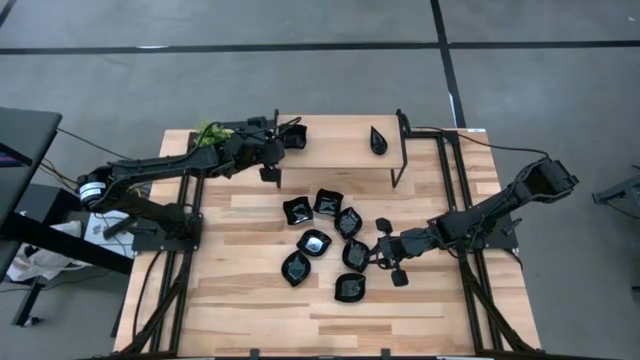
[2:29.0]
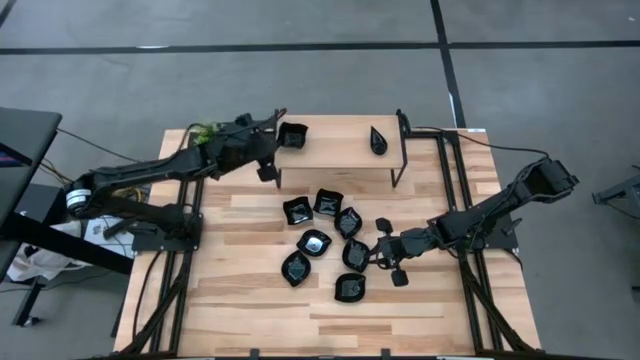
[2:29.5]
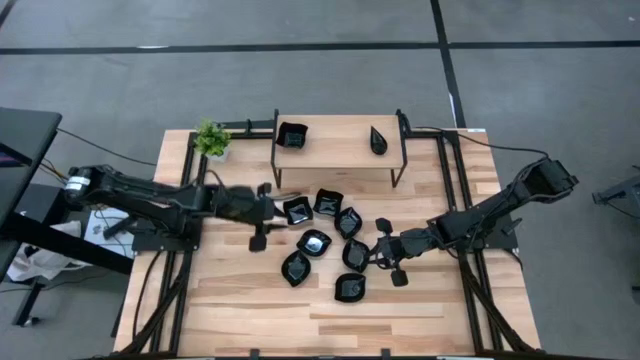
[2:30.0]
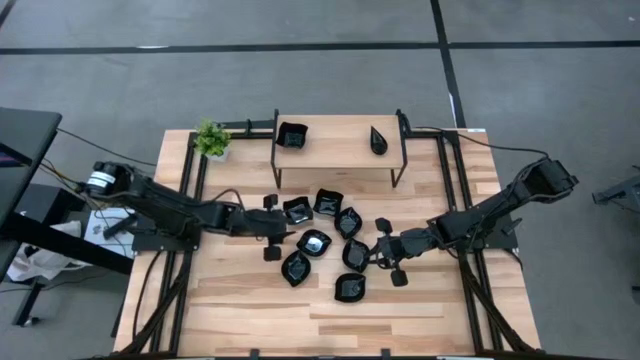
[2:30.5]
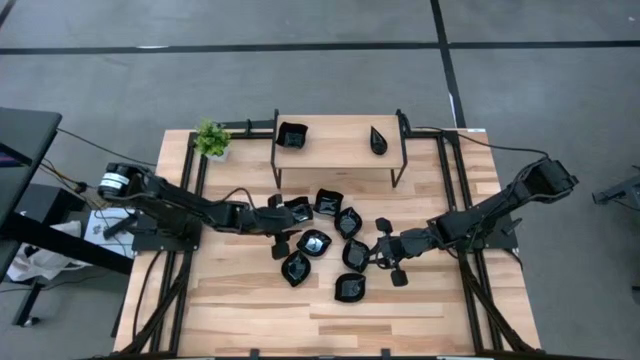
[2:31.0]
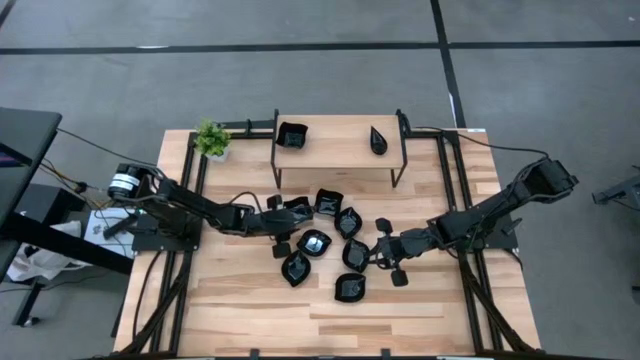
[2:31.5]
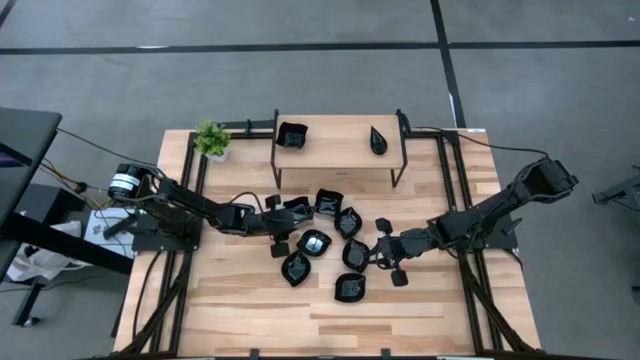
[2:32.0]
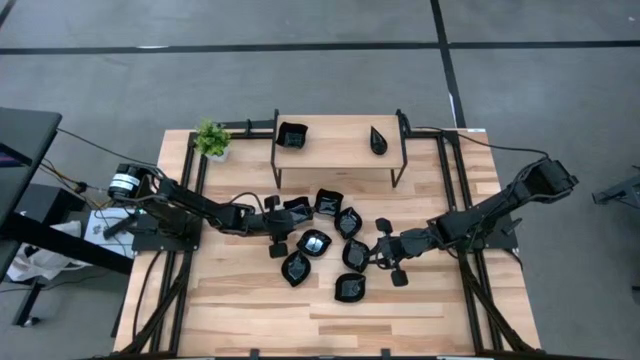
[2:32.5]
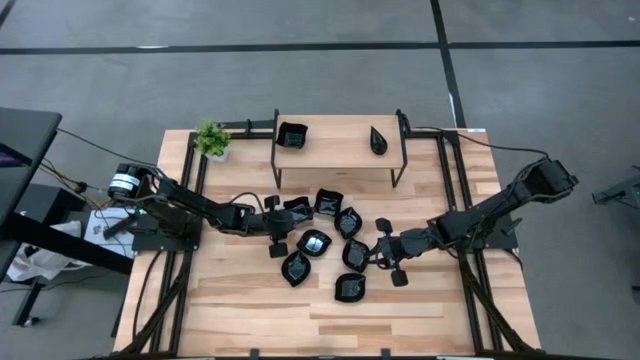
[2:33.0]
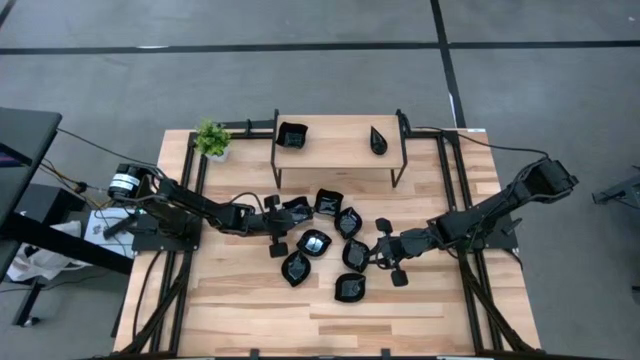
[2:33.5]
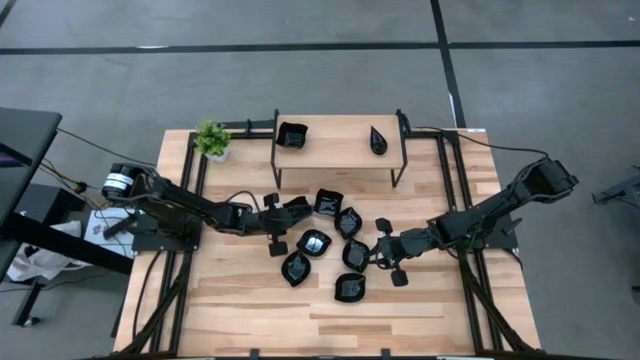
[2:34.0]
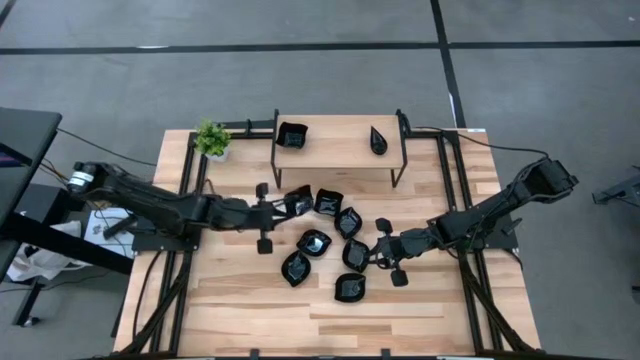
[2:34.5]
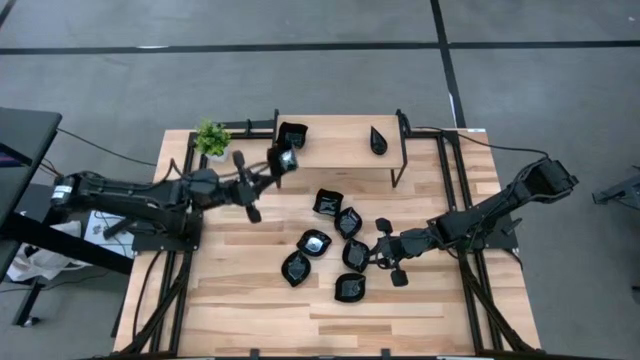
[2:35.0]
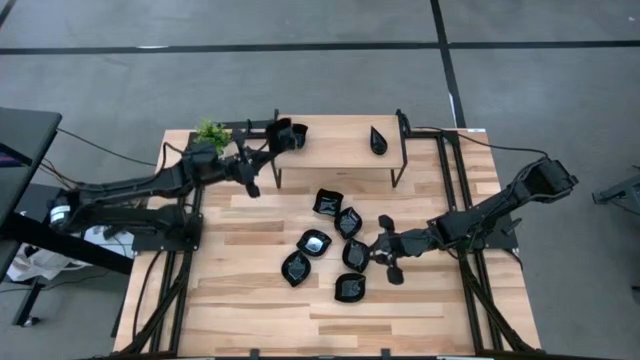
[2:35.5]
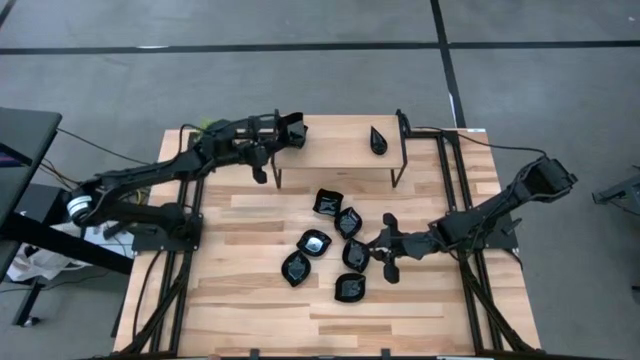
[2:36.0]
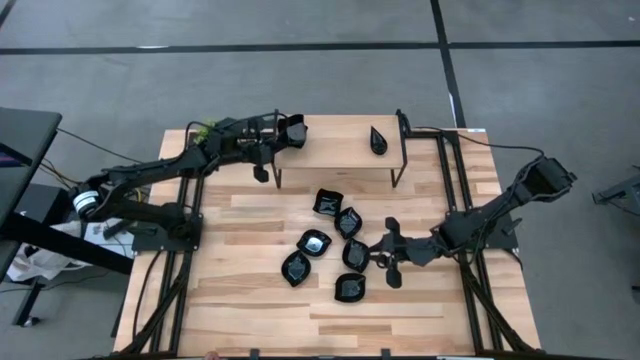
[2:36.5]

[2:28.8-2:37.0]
Task: Pick & Place Mini shaped plates
Stack the black distorted square plate on top of the black distorted square plate on the shelf

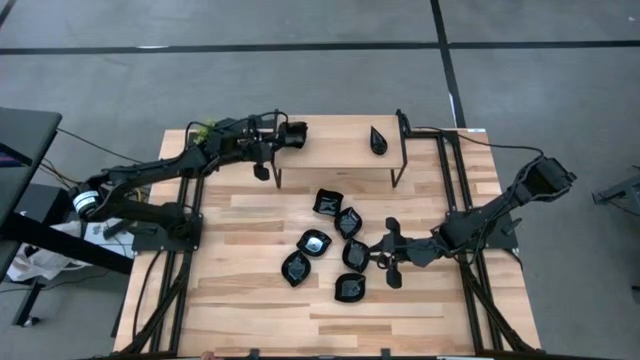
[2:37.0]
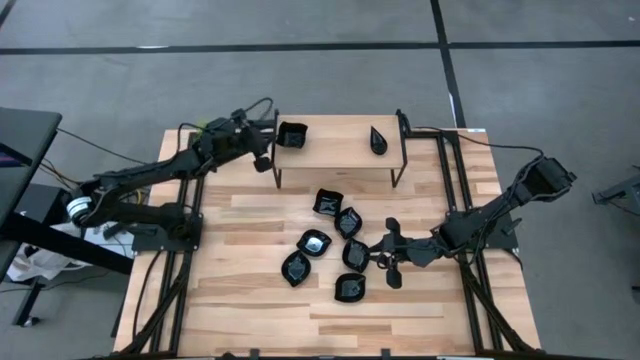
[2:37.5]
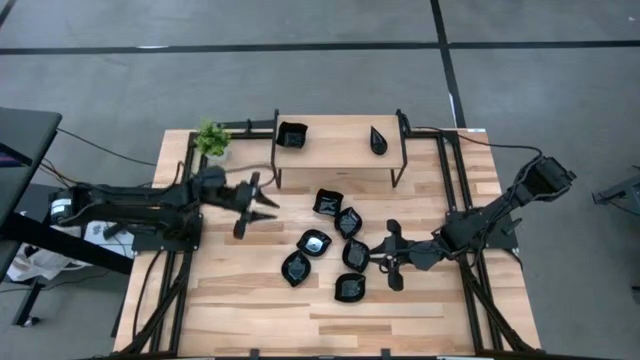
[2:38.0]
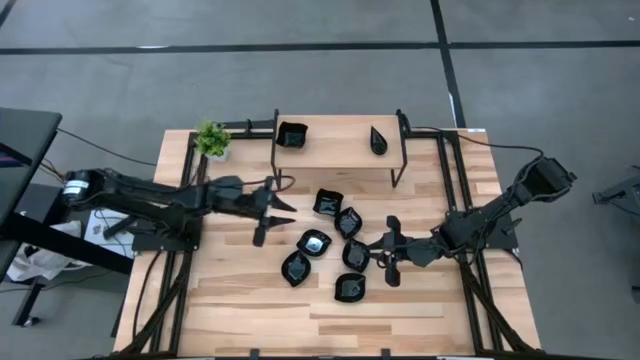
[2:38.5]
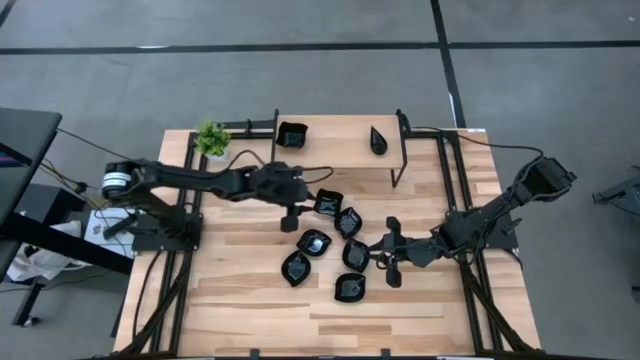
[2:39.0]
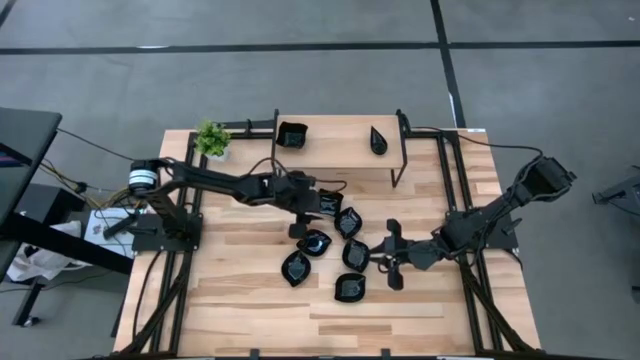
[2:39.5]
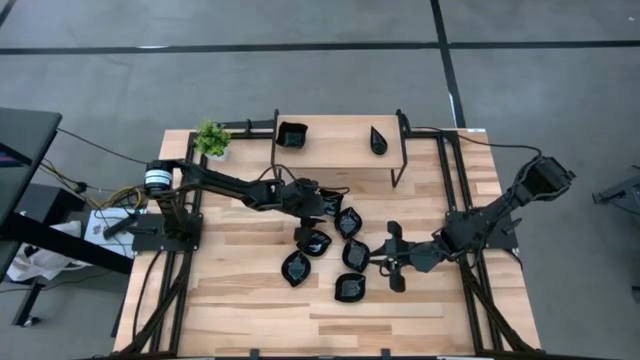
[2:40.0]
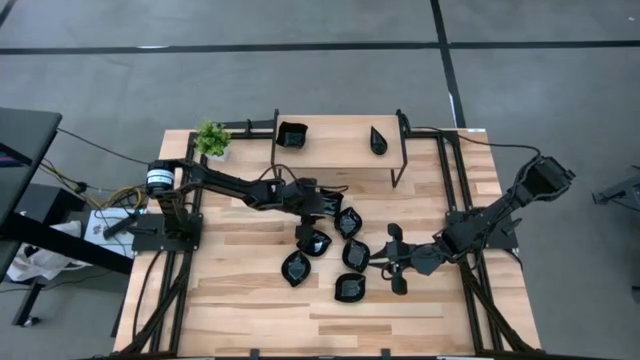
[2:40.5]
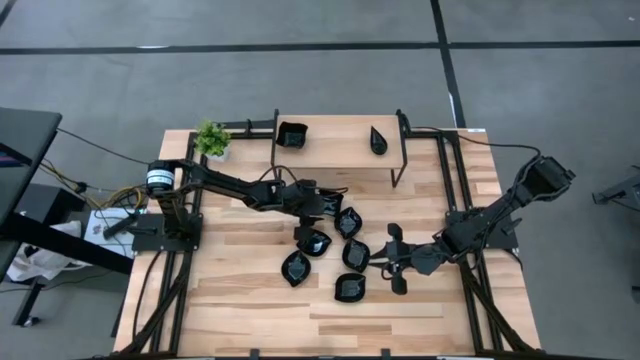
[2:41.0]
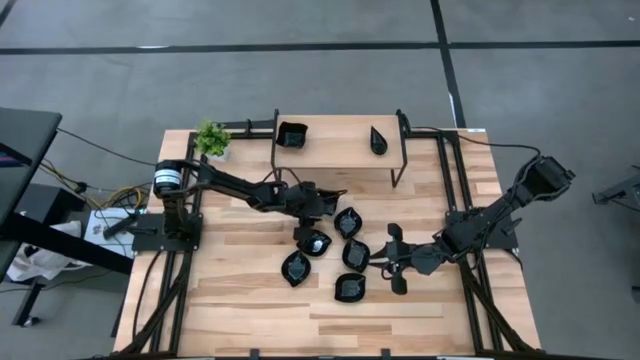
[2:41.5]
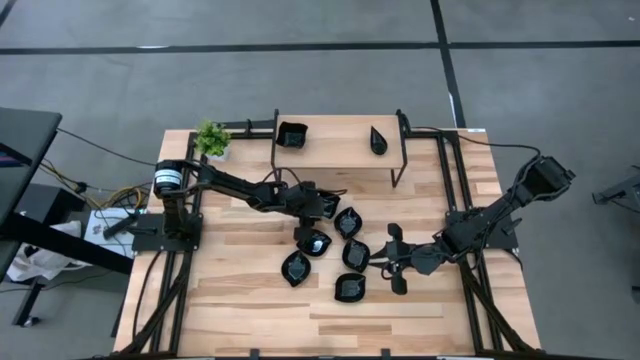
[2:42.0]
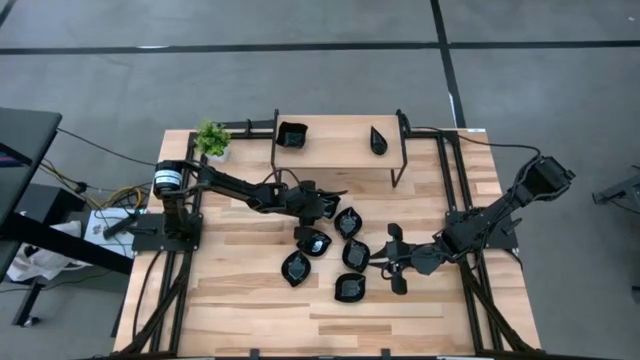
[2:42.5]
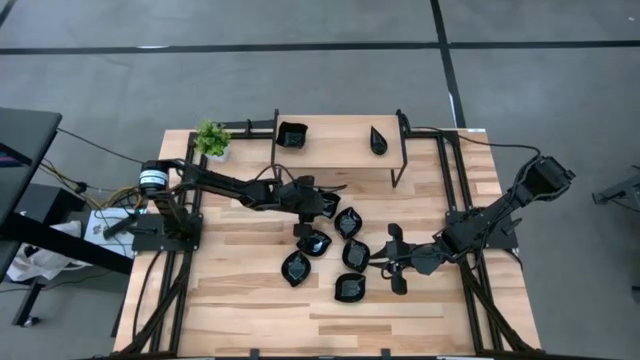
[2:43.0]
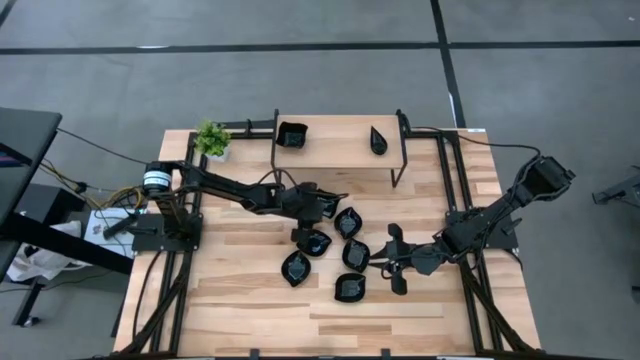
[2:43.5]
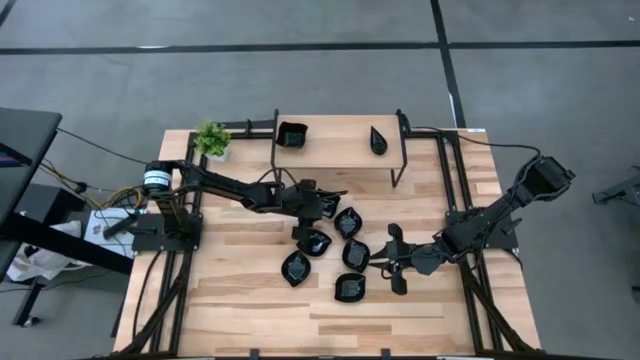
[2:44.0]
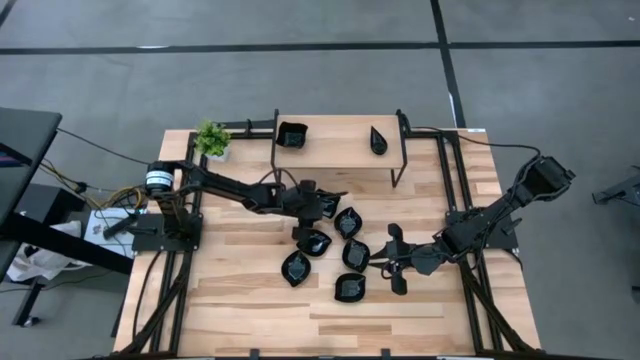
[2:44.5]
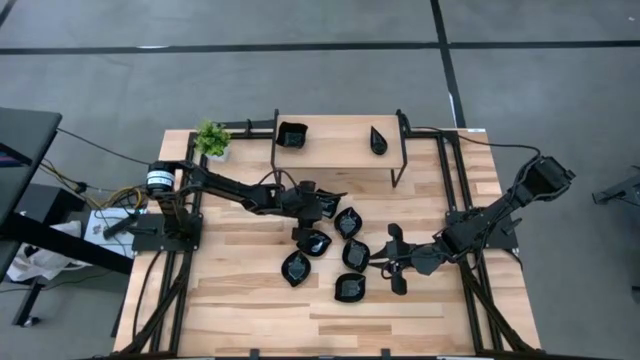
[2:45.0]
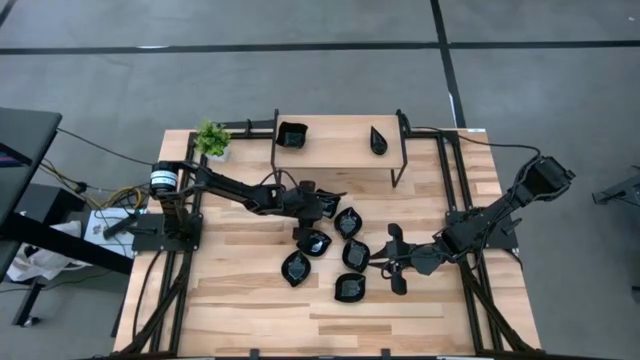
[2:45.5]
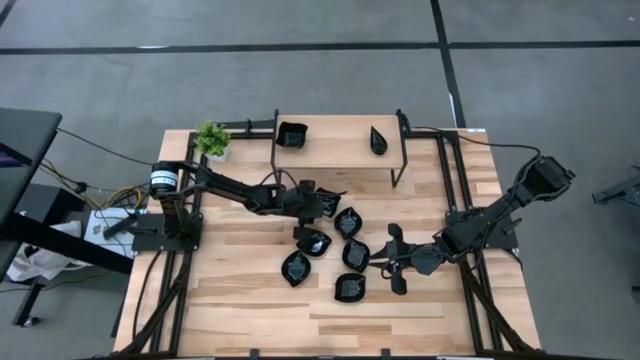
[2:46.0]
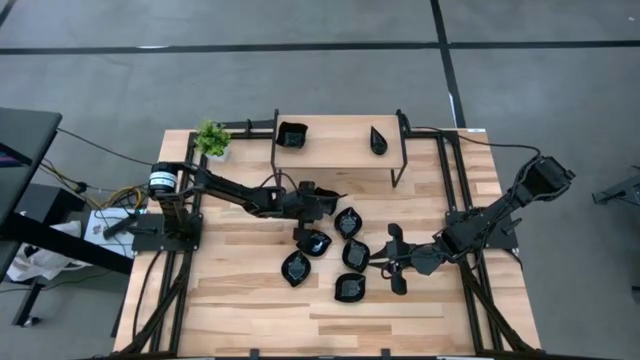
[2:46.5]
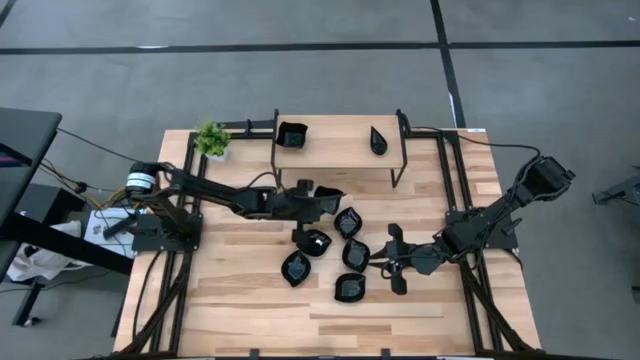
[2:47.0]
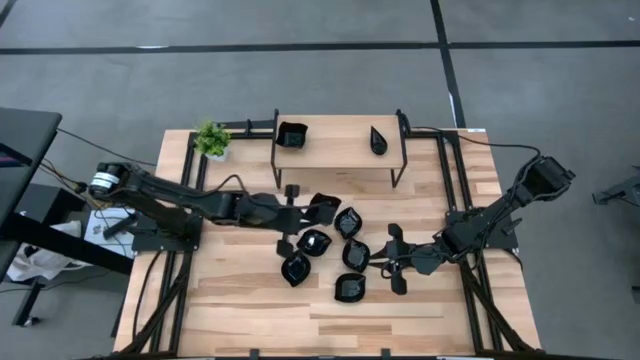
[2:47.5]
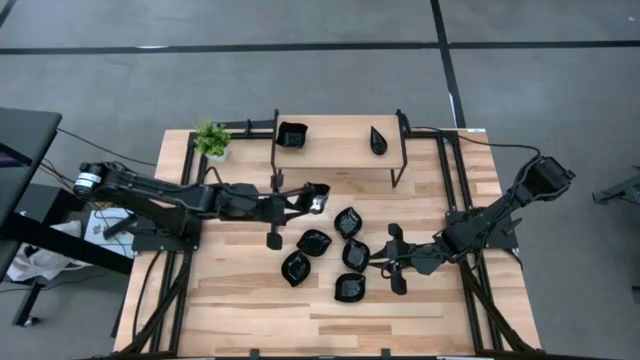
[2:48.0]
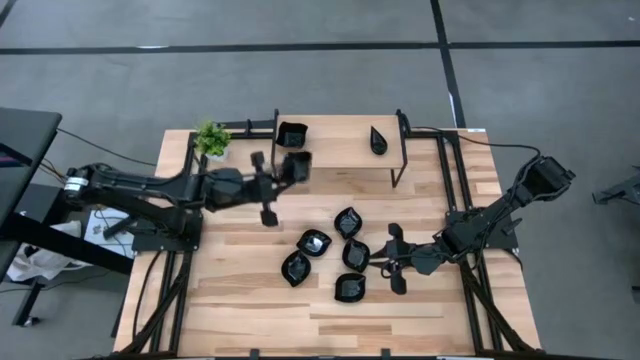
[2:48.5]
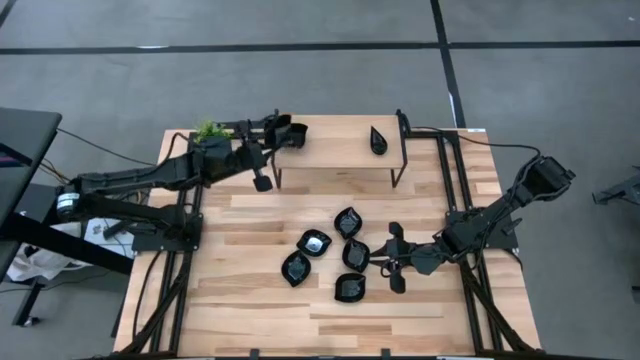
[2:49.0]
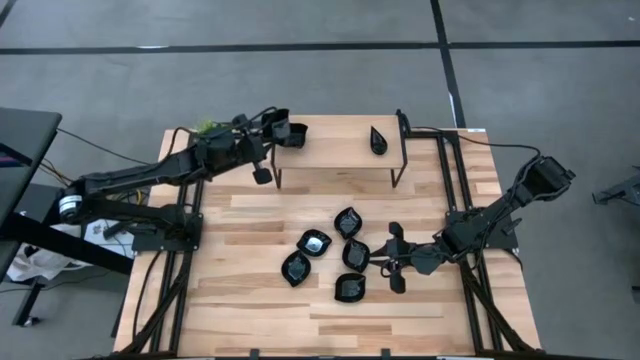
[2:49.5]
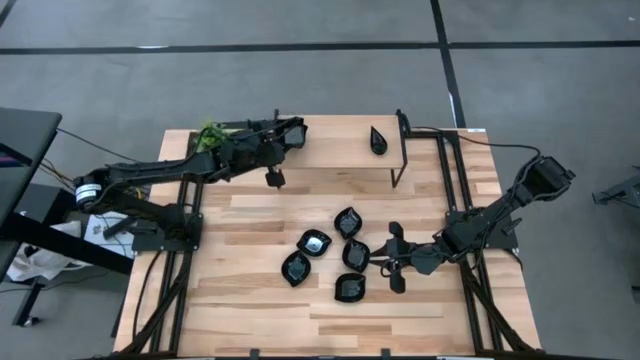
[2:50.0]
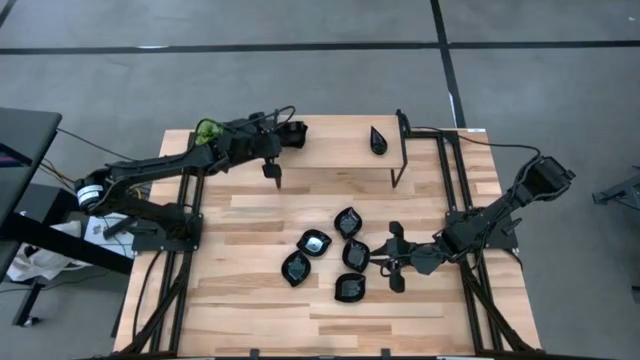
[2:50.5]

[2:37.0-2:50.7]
Stack the black distorted square plate on top of the black distorted square plate on the shelf
